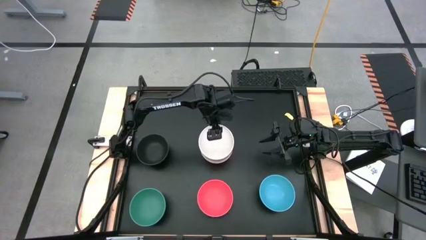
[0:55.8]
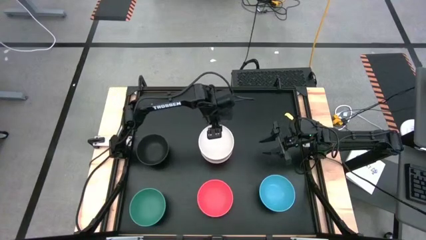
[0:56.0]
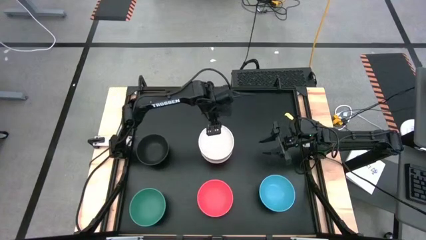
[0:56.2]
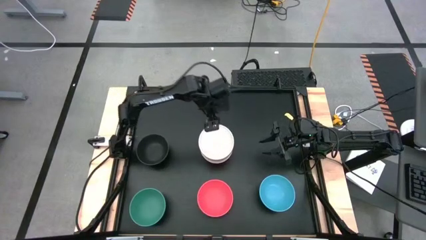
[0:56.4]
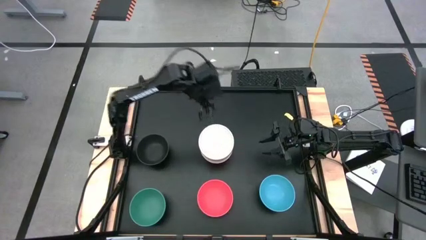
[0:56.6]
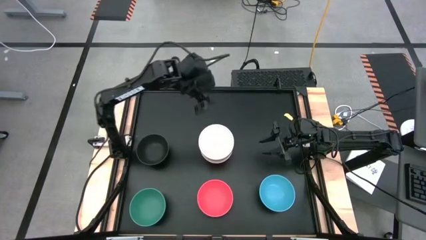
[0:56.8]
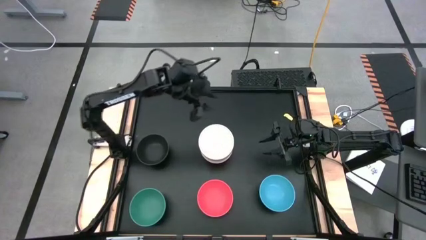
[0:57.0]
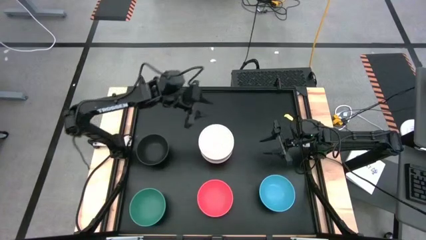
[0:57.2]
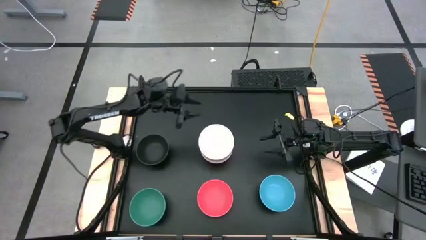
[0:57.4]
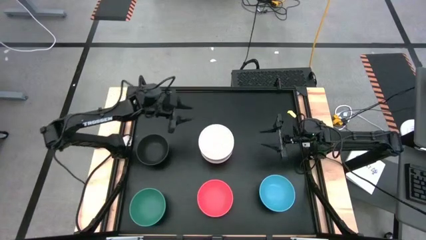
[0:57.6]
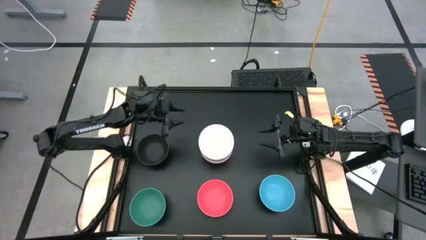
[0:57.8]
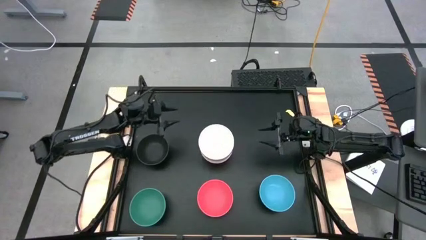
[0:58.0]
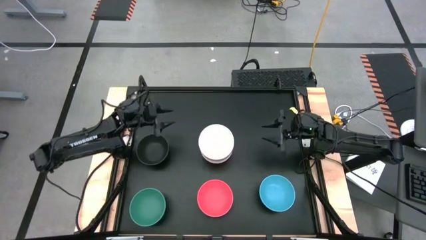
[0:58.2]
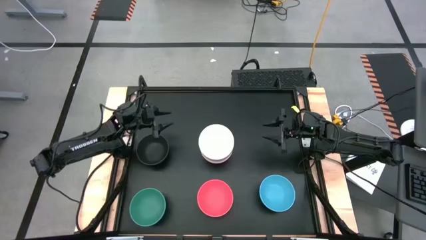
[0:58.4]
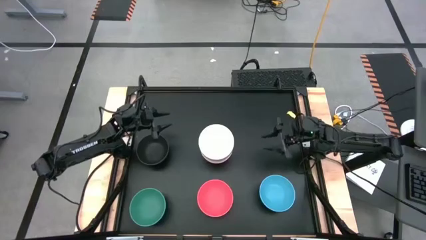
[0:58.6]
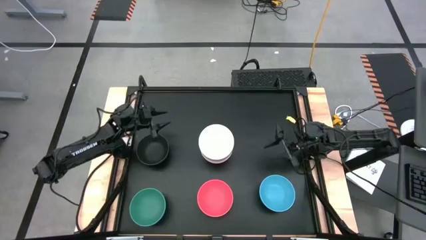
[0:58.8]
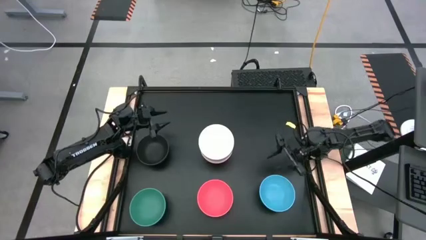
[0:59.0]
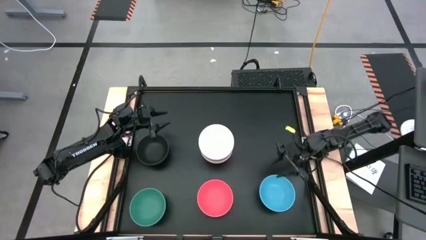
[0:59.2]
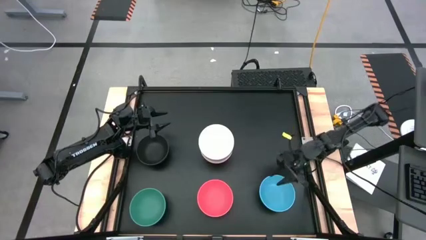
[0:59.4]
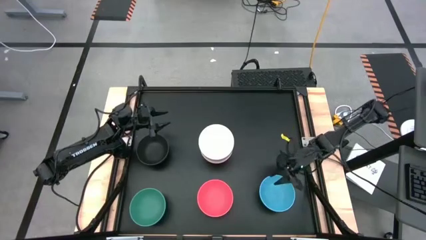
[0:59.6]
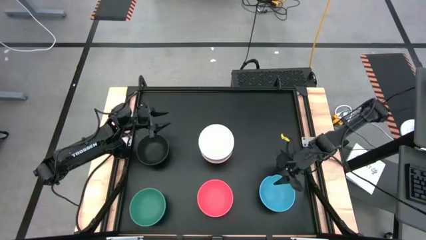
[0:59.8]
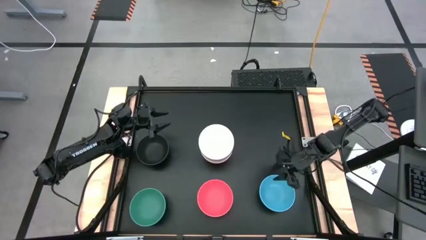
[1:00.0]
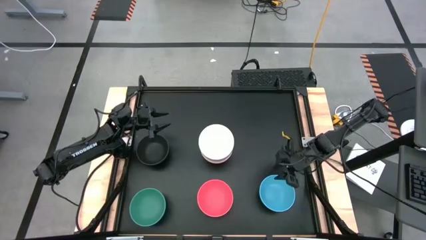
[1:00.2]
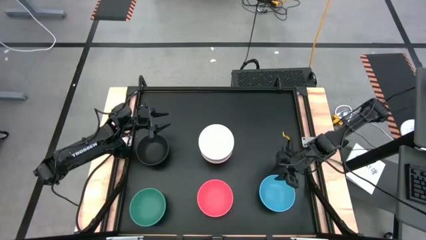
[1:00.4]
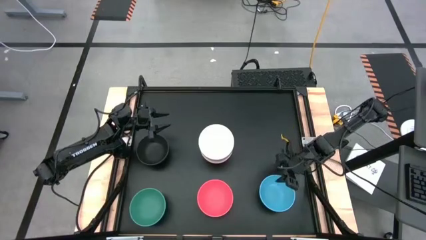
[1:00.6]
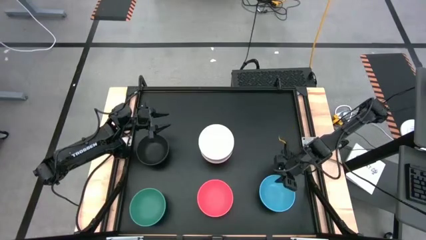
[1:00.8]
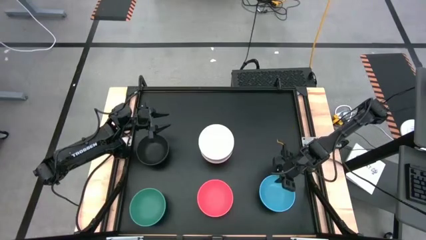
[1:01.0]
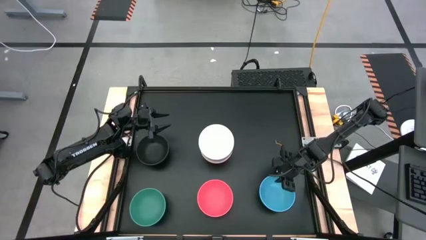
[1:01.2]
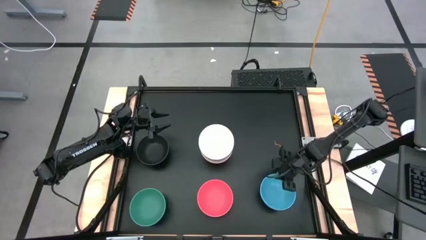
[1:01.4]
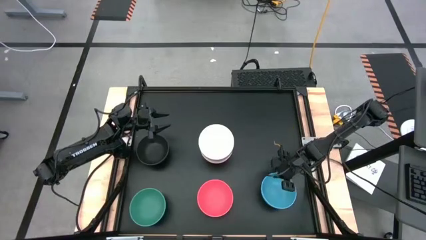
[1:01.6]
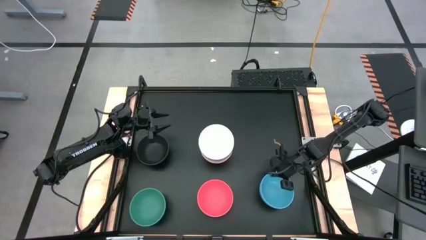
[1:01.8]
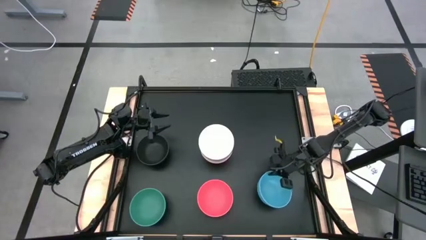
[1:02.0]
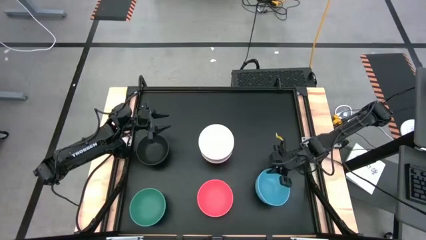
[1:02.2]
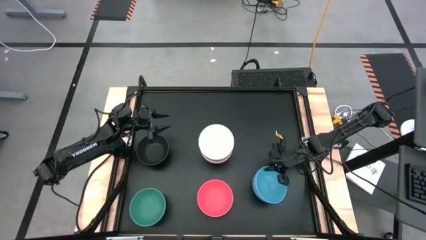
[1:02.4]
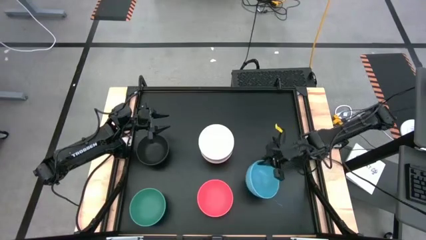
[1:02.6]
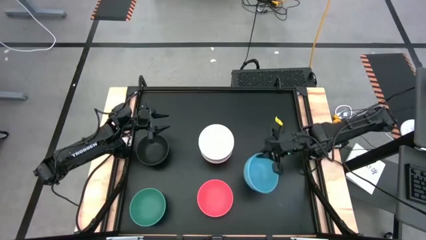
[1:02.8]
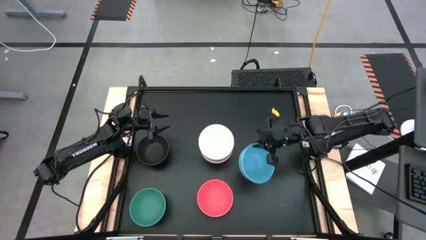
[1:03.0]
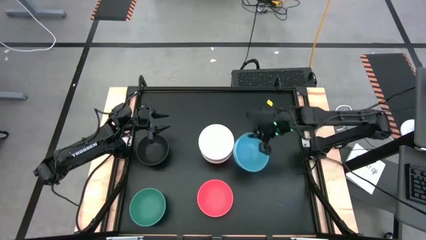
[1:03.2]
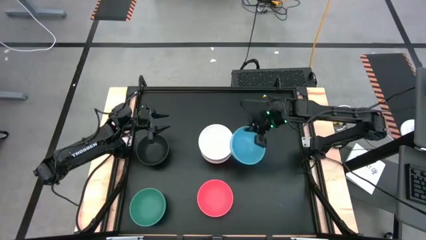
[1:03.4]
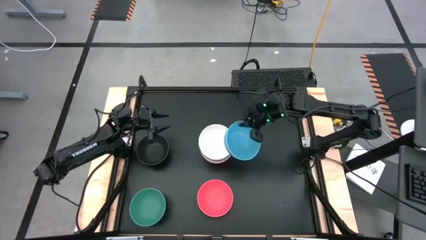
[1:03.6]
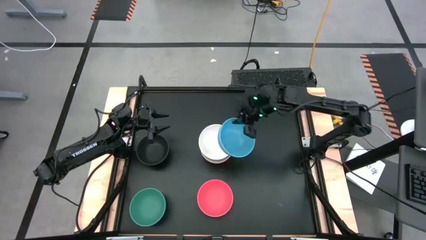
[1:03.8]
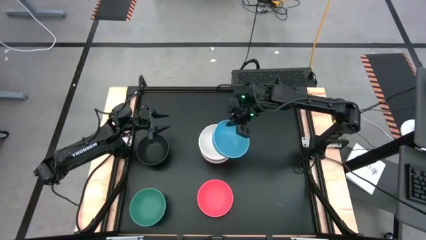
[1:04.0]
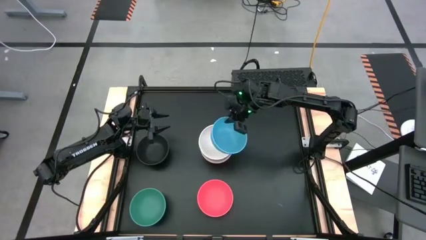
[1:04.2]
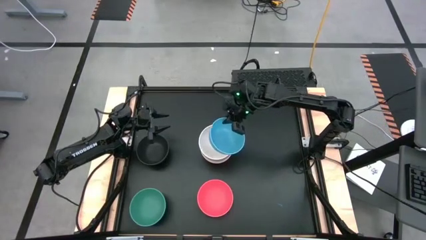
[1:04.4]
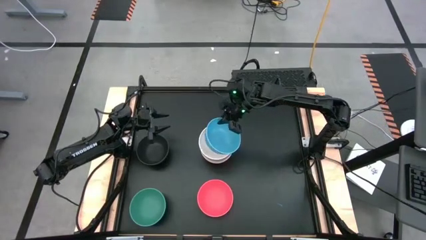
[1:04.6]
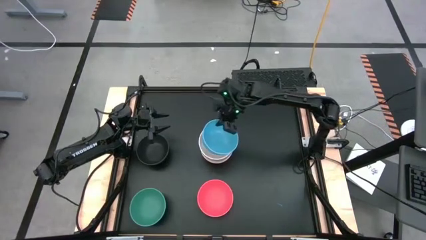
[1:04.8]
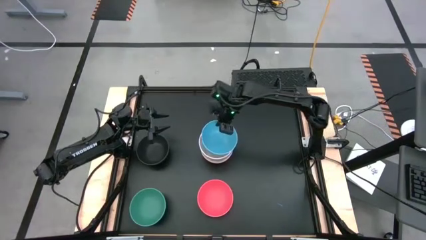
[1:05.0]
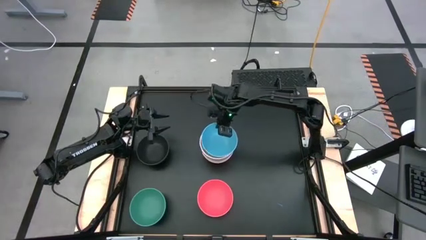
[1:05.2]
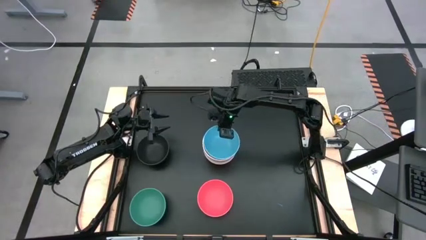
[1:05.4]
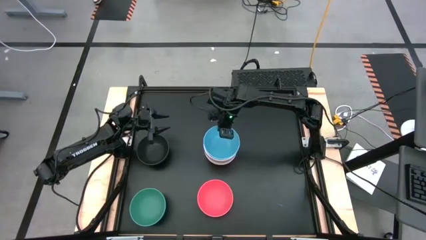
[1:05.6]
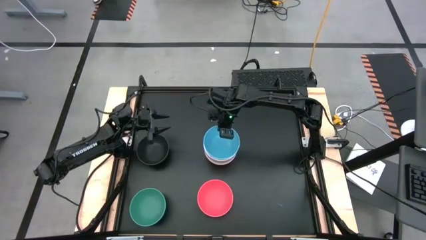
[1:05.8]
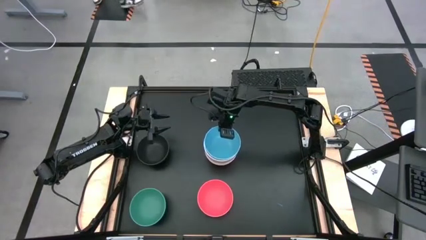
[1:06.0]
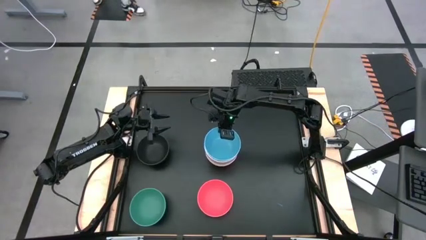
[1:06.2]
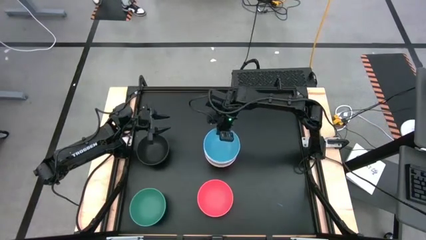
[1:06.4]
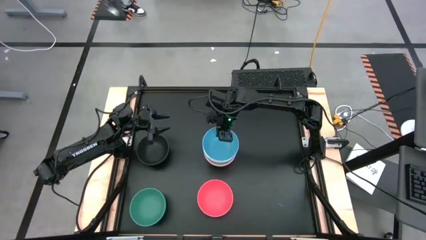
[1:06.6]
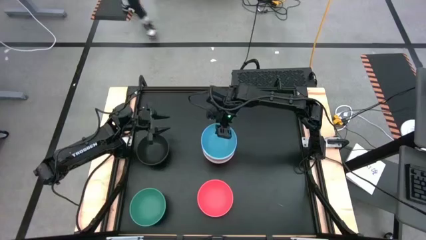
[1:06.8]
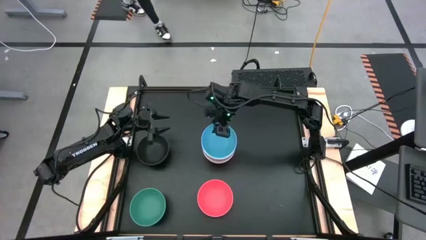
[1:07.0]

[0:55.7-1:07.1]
Task: Nest bowls inside each other
Stack the blue bowl on top of the white bowl

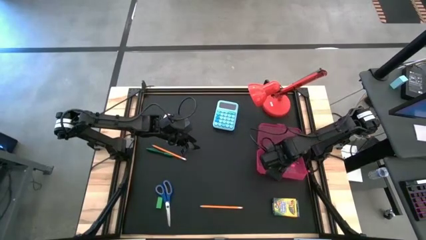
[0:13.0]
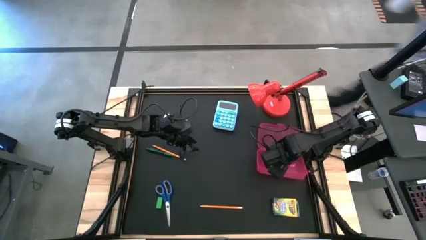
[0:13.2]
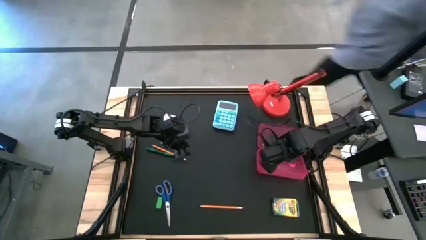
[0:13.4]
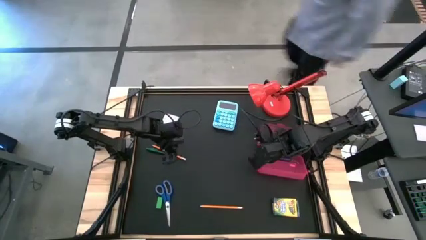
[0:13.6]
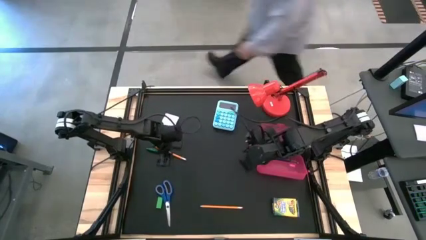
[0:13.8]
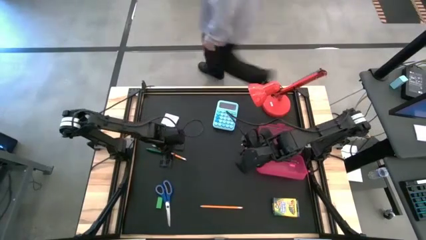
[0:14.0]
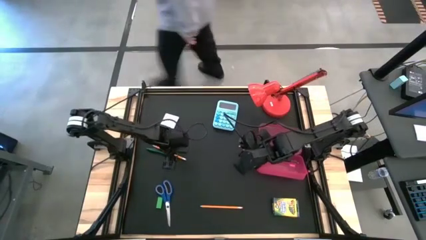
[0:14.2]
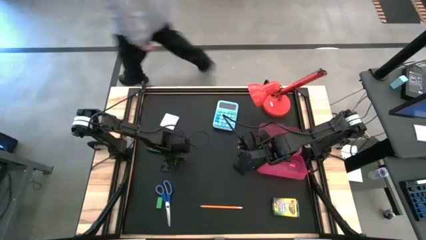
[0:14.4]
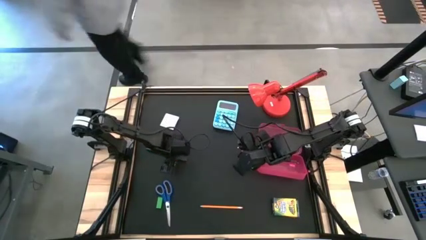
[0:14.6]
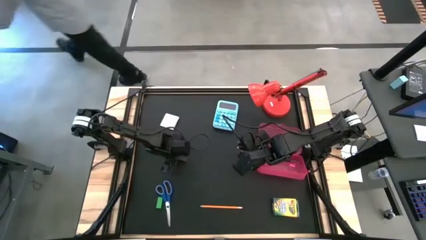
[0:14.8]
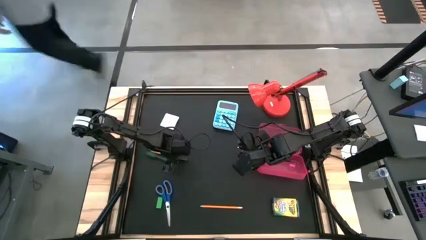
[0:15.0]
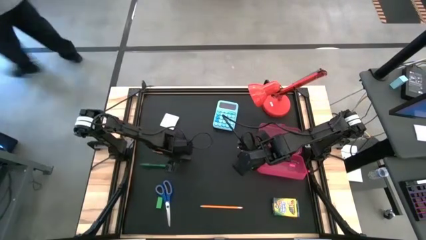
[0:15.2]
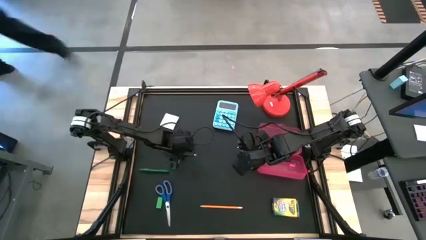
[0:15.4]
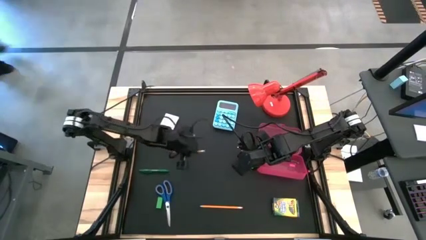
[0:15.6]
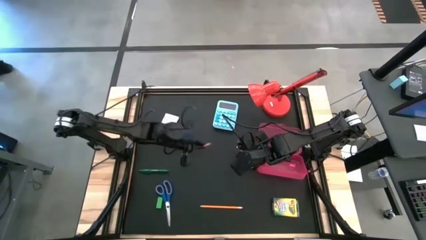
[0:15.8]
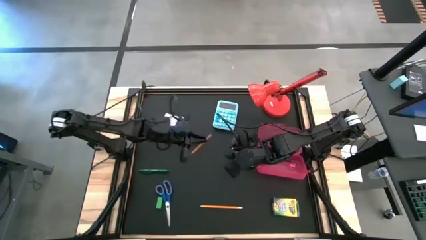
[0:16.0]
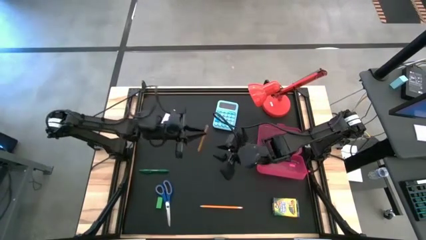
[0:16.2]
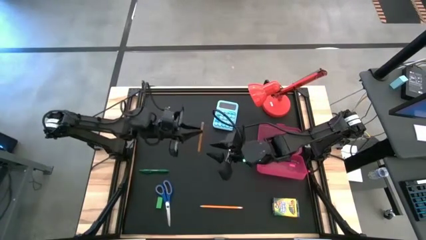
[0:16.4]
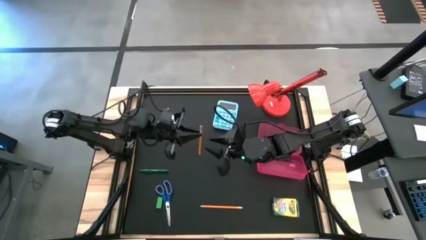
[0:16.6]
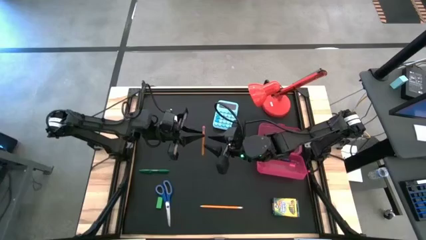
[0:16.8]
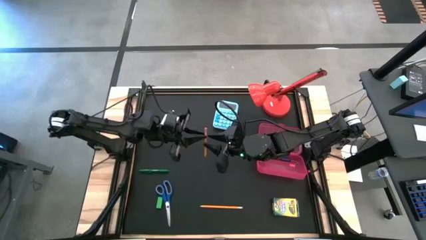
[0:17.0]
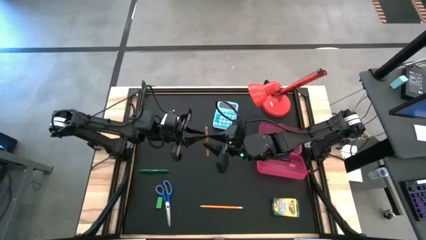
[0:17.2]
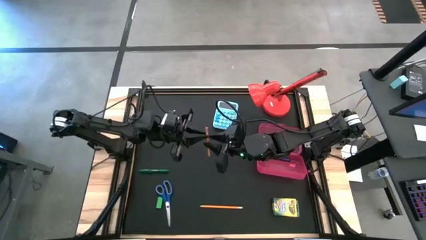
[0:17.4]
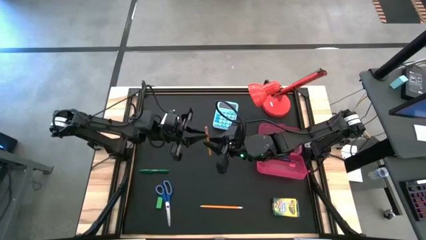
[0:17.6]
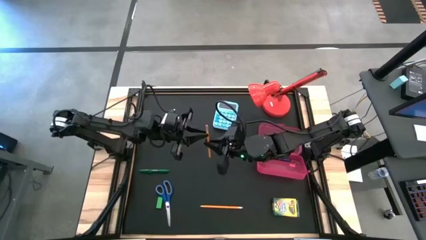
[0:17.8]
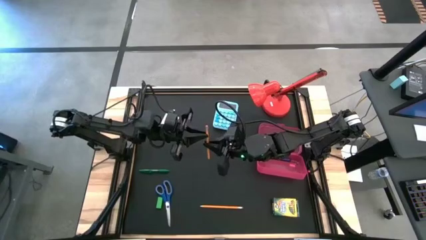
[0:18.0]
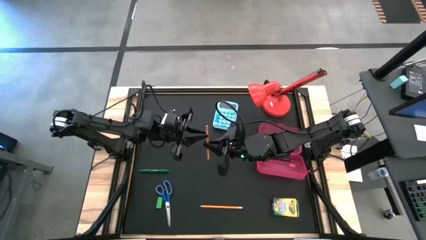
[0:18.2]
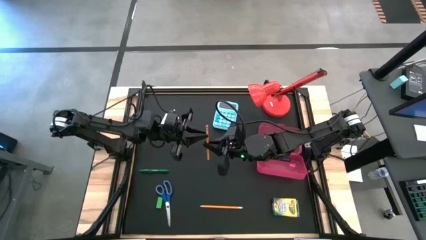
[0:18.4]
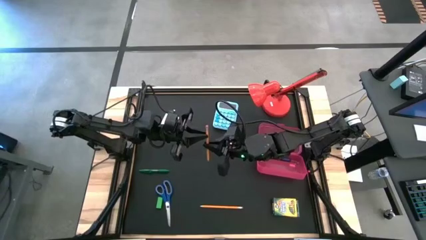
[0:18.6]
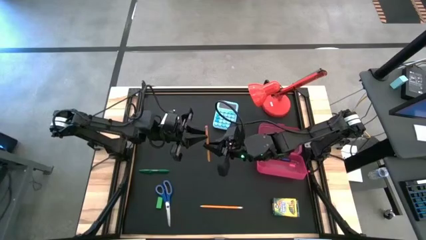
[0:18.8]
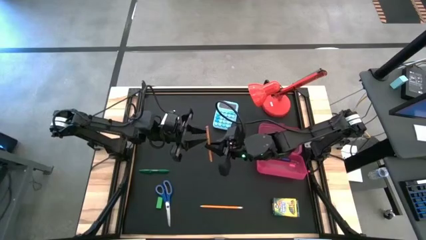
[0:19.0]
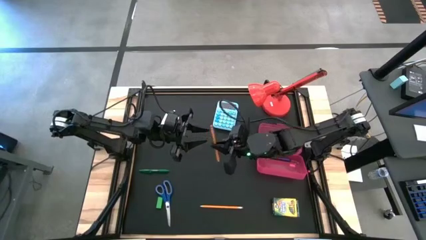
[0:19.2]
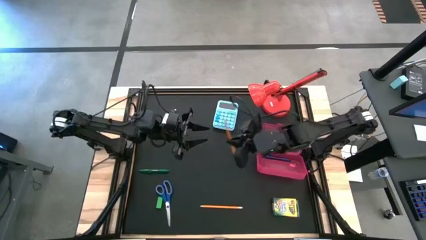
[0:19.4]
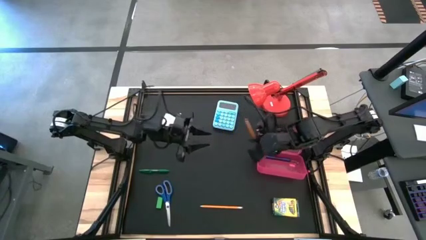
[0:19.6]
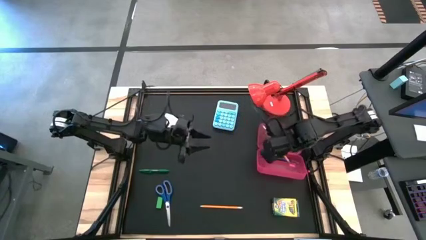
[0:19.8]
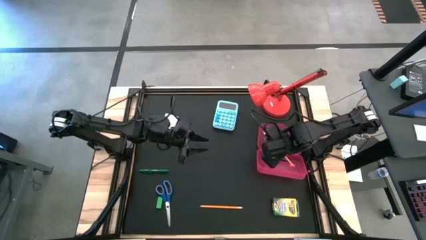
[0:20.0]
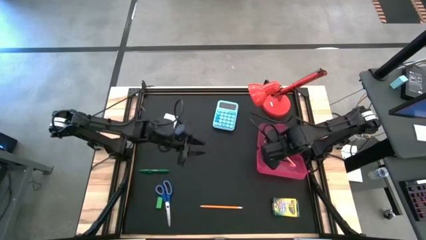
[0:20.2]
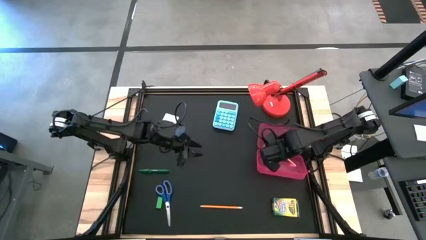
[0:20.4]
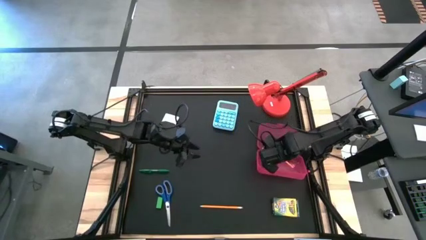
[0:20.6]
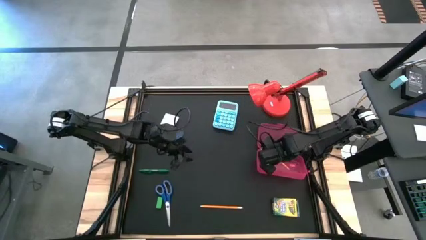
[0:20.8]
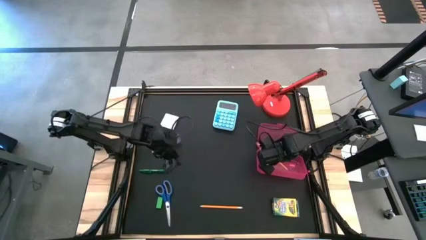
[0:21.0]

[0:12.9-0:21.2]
Task: Pack school essentials
Put the top orange pencil into the red supply box
